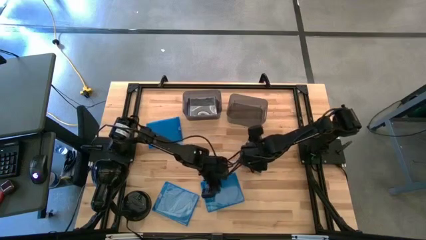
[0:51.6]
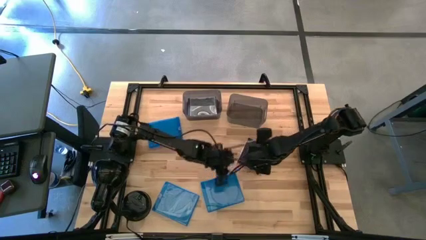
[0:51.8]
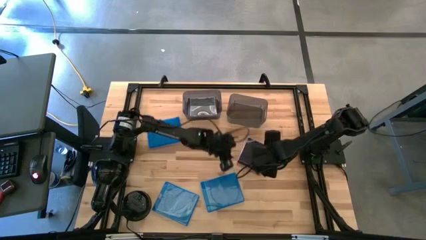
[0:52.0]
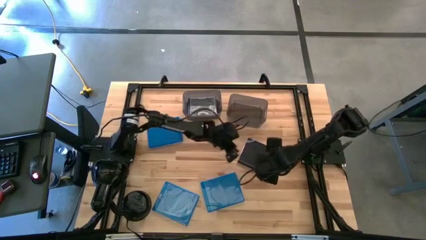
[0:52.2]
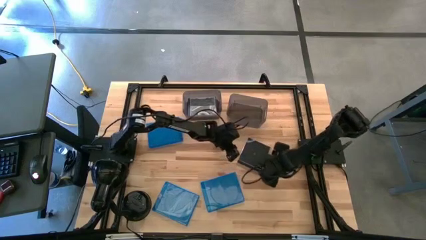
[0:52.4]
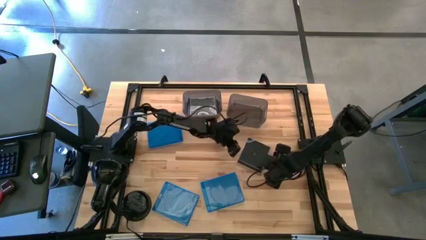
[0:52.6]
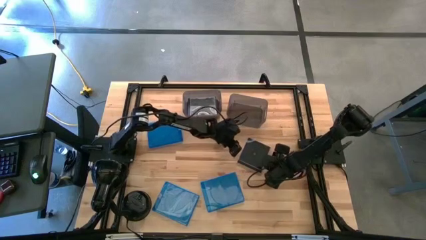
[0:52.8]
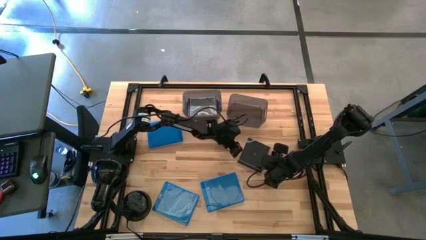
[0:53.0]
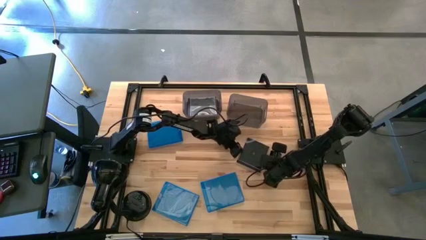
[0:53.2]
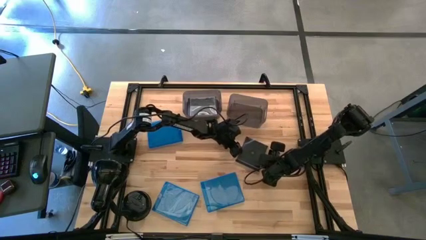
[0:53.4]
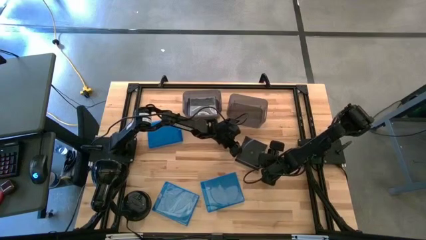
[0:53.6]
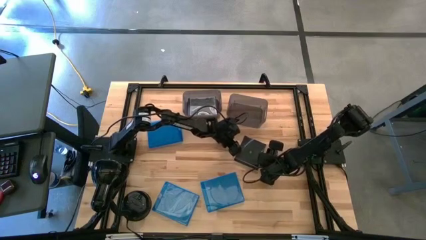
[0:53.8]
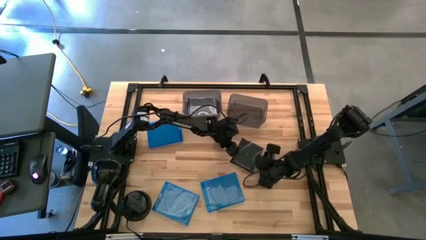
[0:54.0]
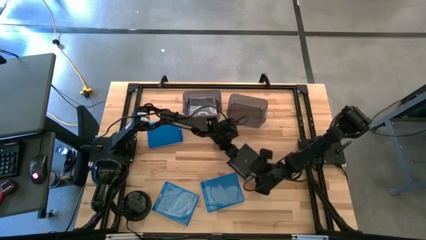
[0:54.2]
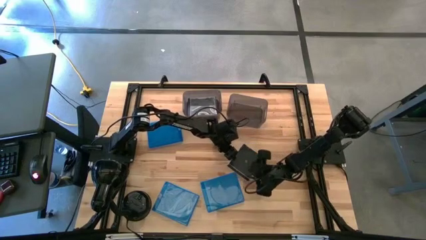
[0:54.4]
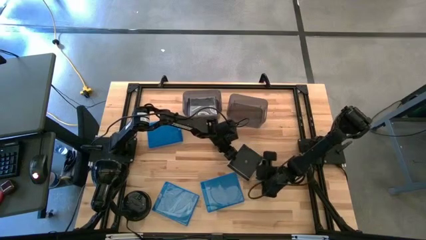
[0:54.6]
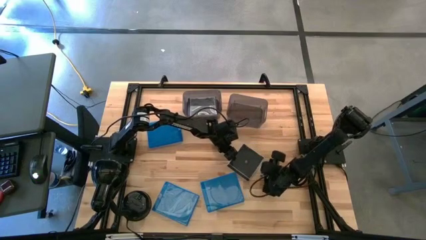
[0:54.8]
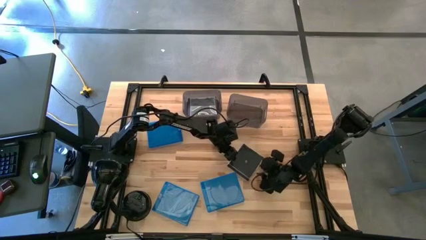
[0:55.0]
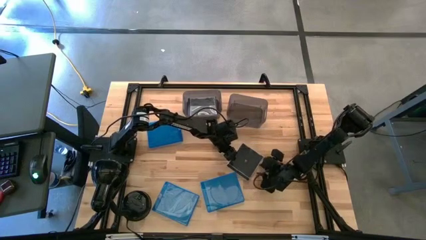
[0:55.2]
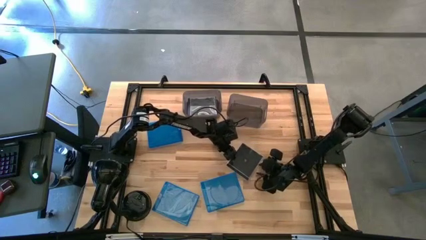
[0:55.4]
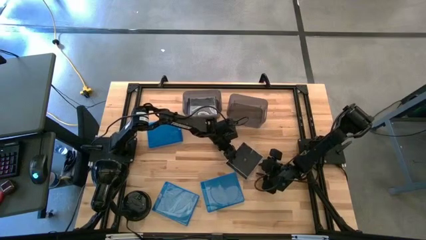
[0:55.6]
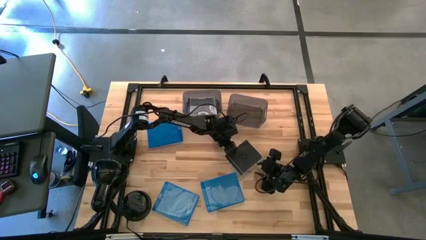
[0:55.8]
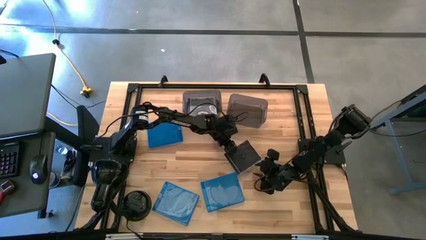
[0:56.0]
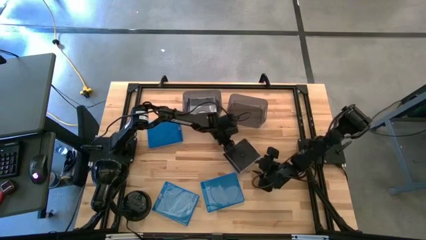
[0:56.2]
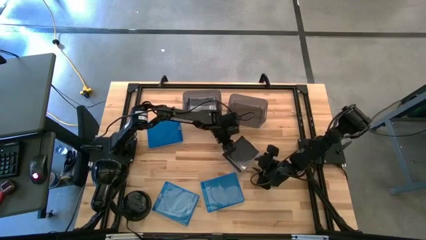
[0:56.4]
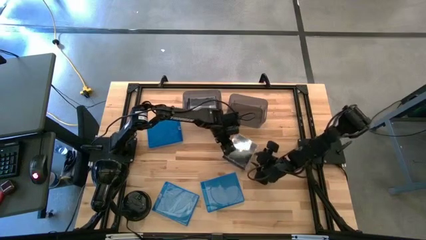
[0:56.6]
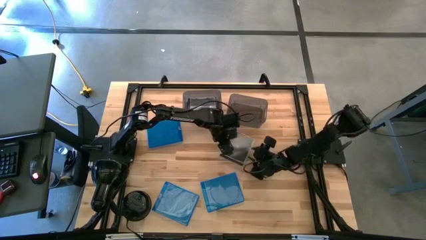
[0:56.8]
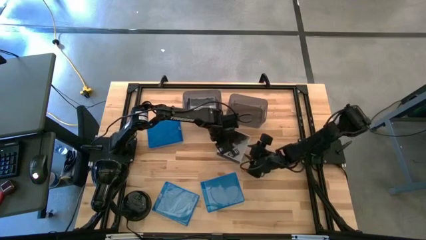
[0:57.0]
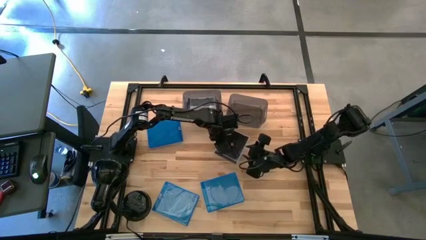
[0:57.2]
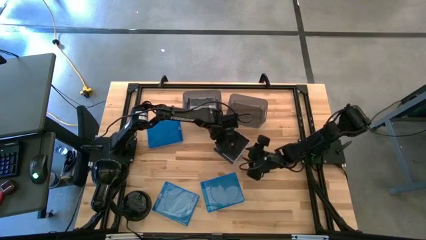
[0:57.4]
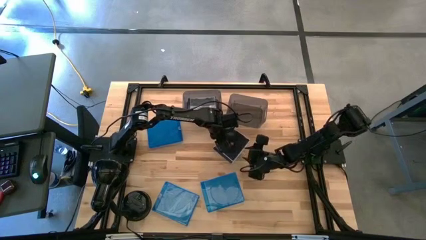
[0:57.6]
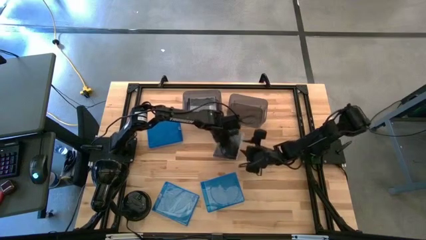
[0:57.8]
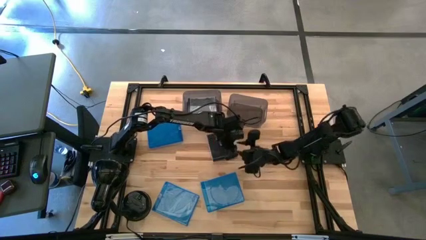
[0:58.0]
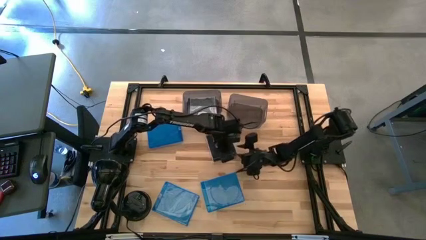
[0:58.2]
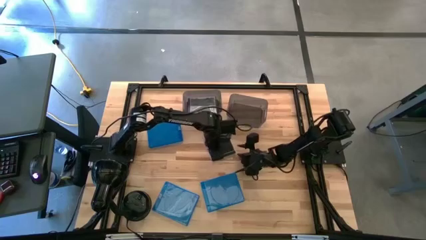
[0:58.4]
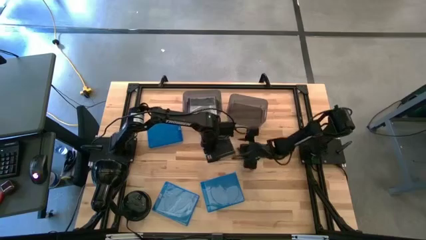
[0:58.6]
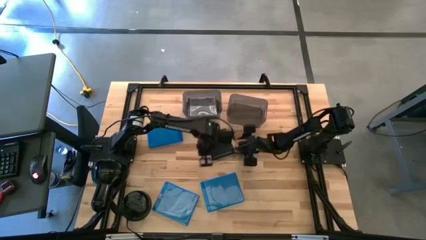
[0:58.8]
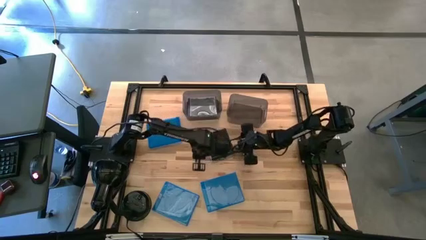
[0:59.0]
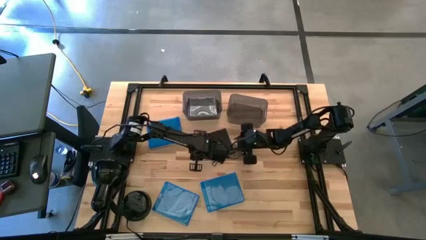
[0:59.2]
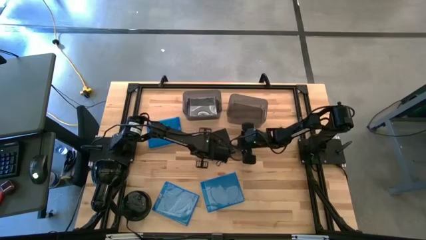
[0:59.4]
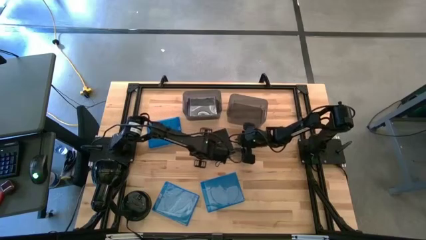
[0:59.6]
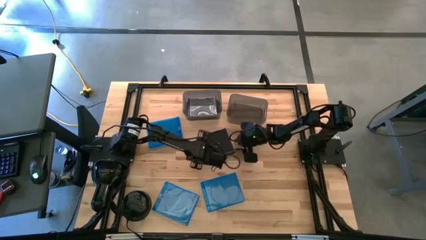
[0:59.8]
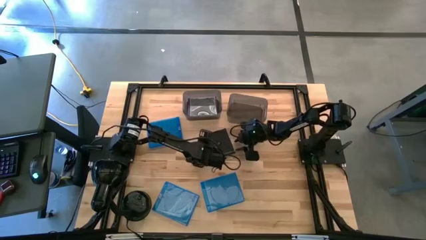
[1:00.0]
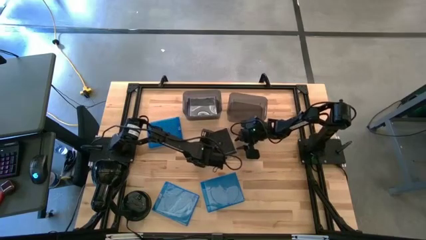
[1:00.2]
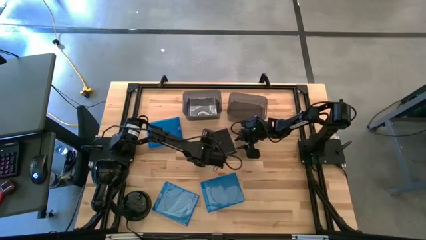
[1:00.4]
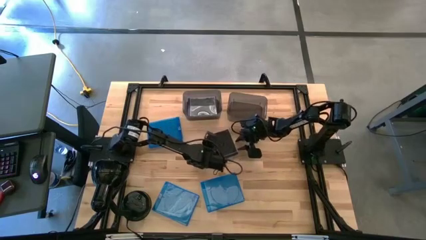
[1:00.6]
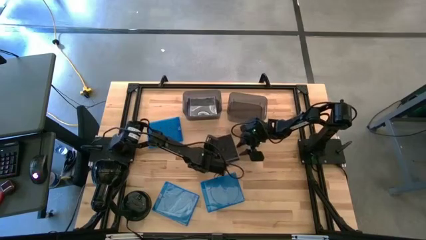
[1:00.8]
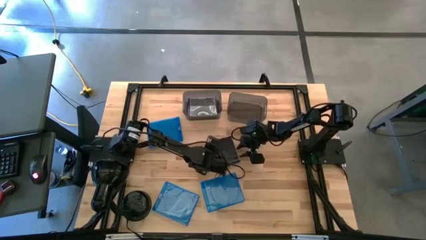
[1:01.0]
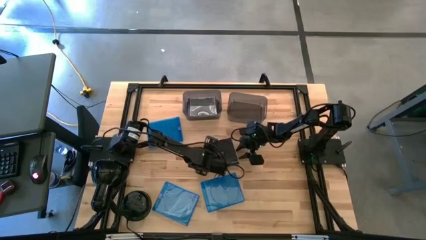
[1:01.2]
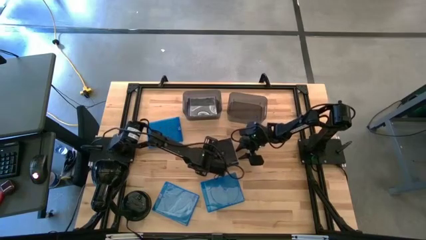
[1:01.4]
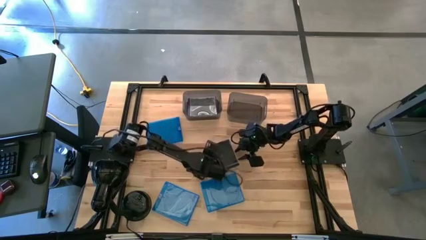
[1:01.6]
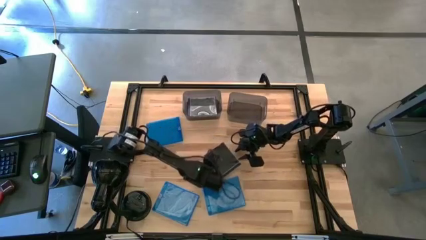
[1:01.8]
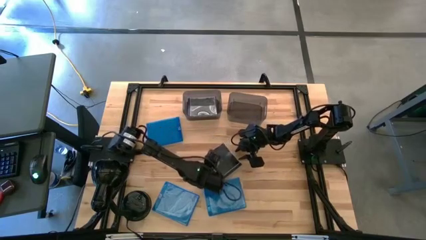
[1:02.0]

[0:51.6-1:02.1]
Task: Pick & place jewel cases by type
Put the black CD case into the left black bin
